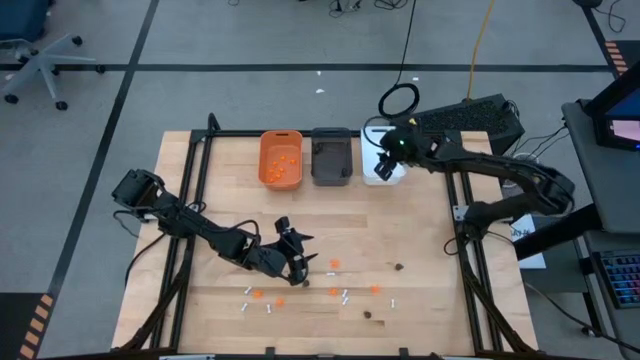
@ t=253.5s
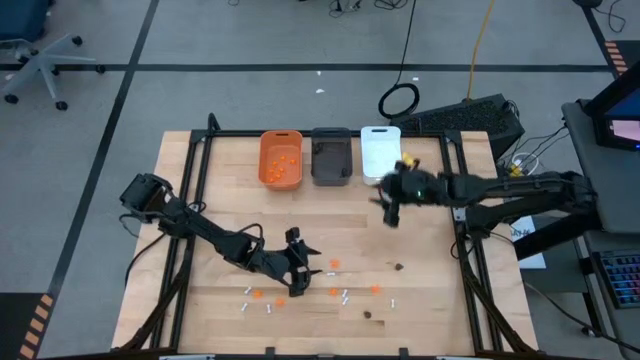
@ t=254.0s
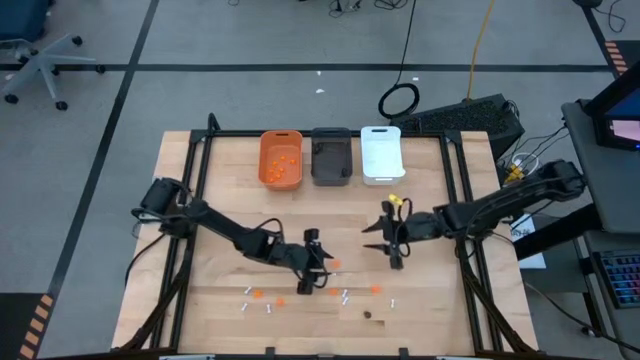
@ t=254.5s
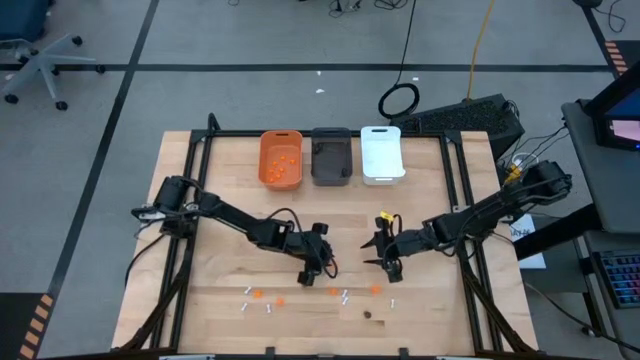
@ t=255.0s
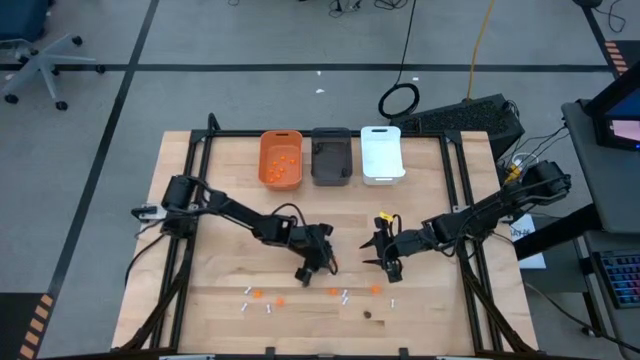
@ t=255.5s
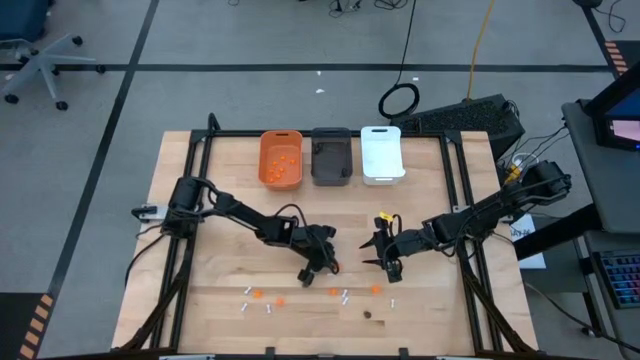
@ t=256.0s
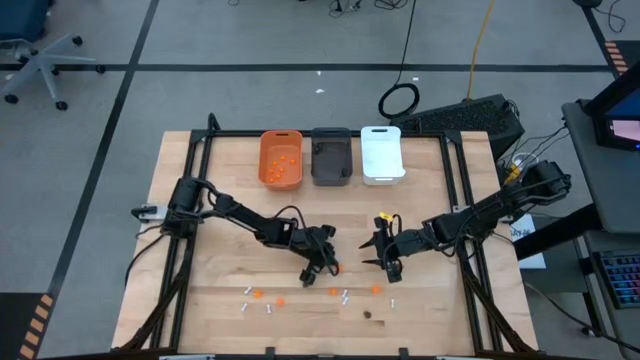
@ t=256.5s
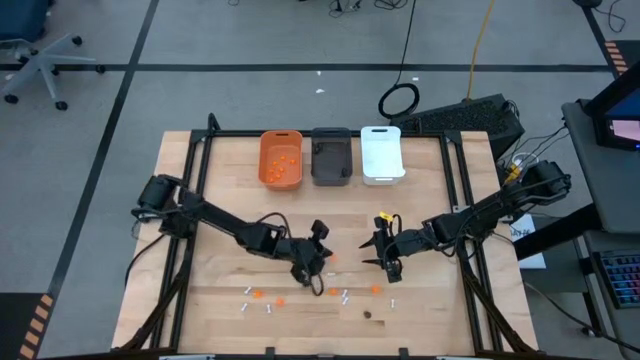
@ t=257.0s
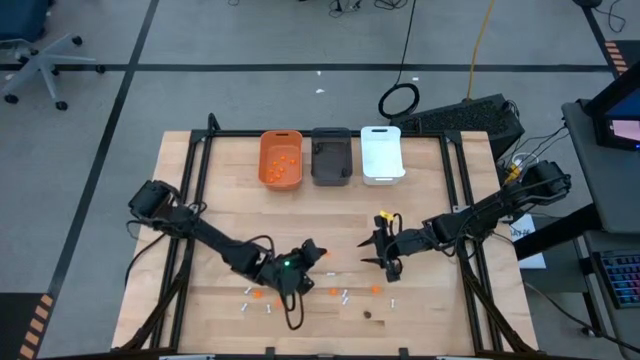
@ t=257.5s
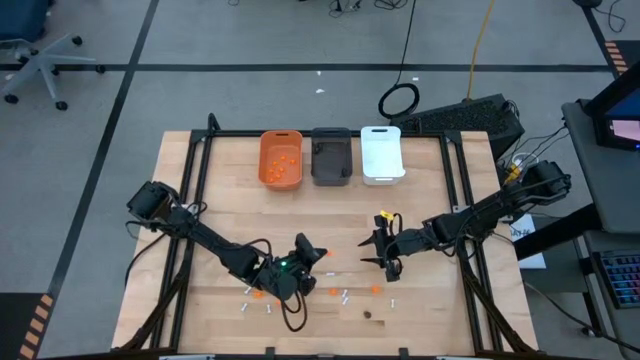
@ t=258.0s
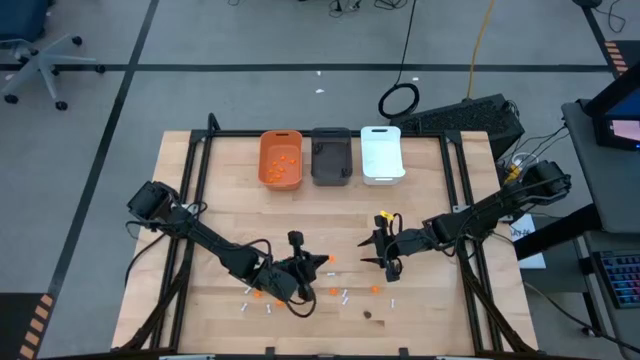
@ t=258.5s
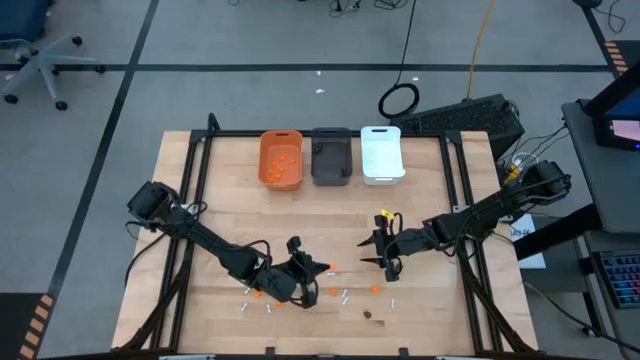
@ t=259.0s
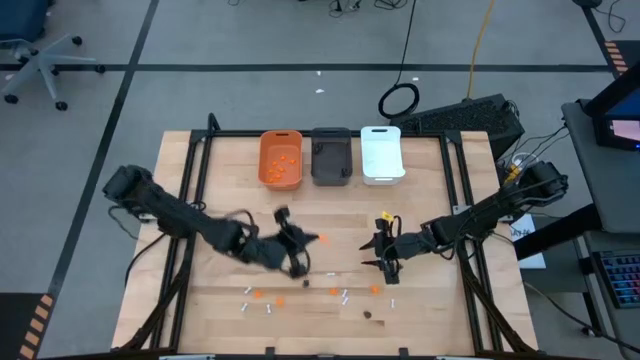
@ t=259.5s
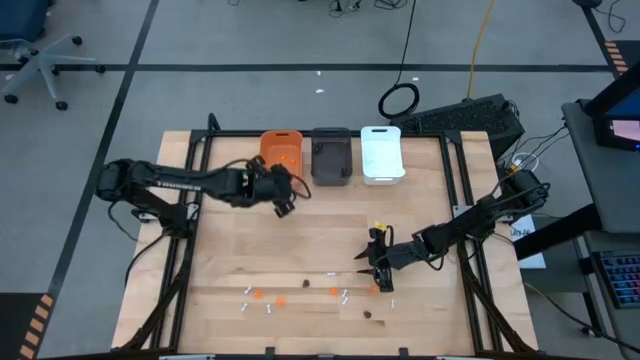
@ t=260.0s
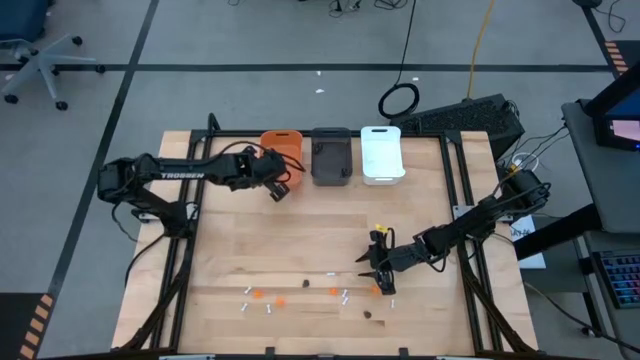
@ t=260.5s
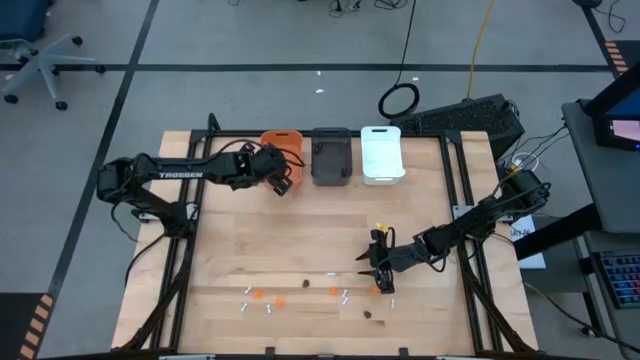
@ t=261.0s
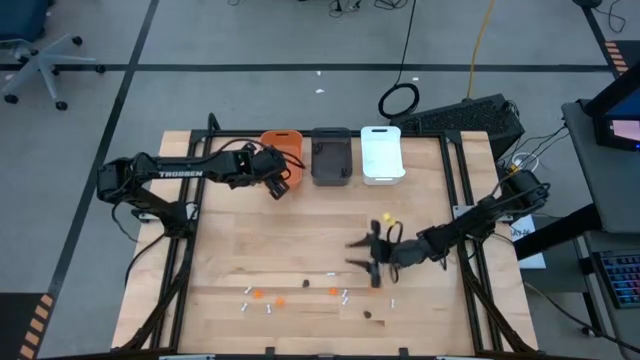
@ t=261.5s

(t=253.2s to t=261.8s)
Task: Sort Halloween decoration
Put the orange spider toy into the orange bin

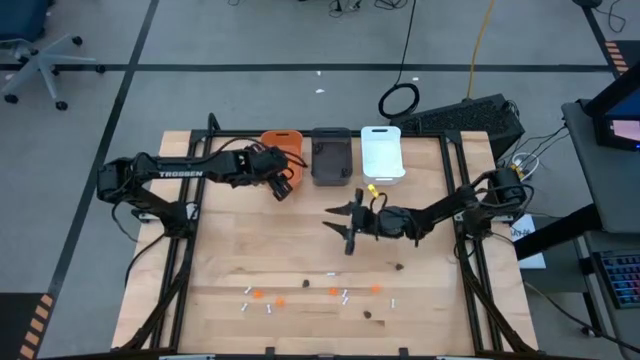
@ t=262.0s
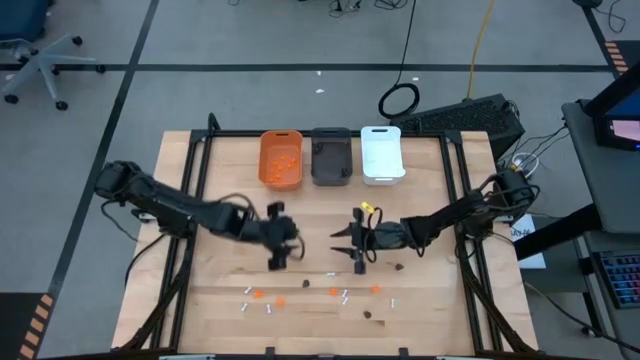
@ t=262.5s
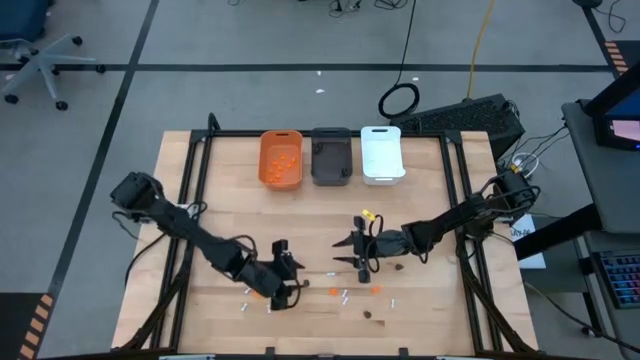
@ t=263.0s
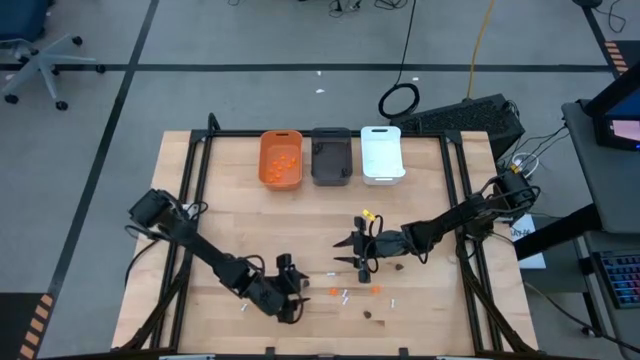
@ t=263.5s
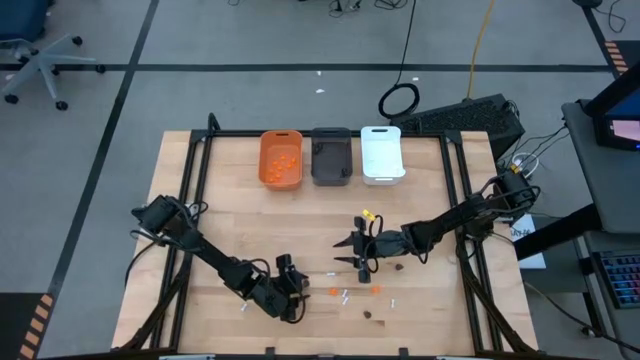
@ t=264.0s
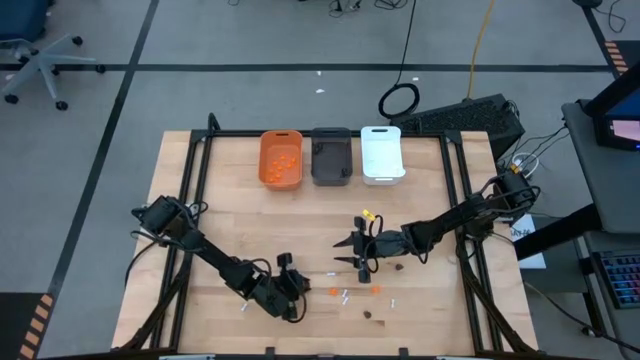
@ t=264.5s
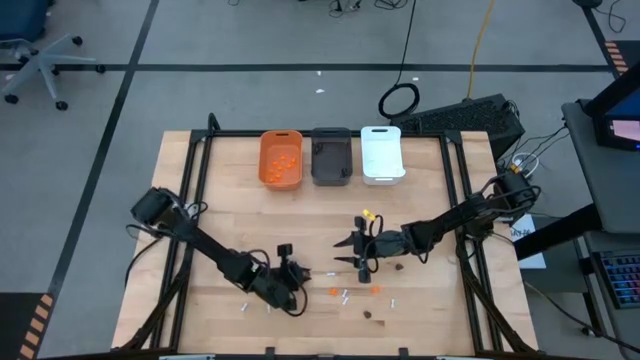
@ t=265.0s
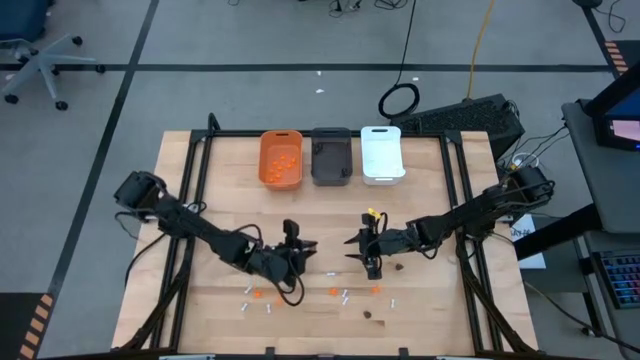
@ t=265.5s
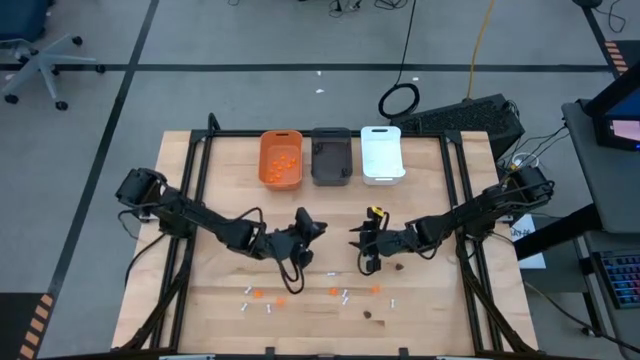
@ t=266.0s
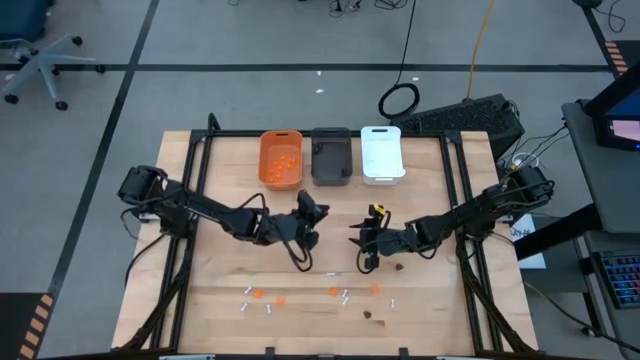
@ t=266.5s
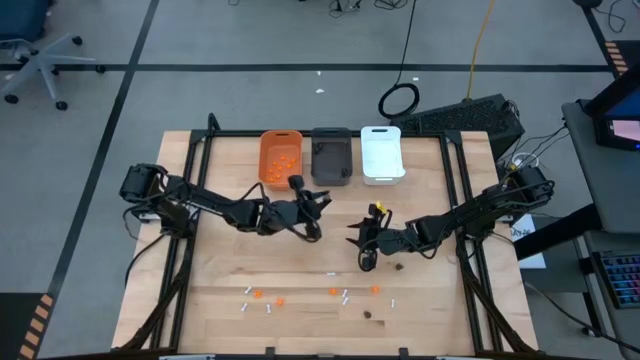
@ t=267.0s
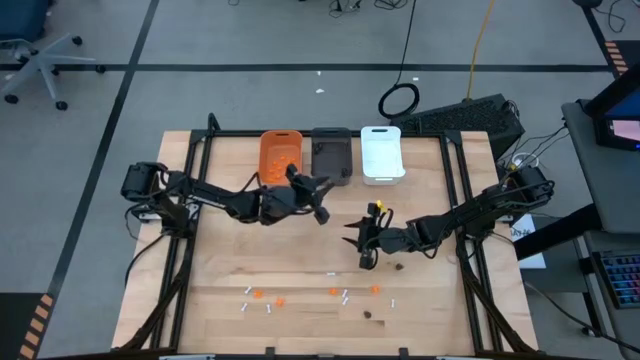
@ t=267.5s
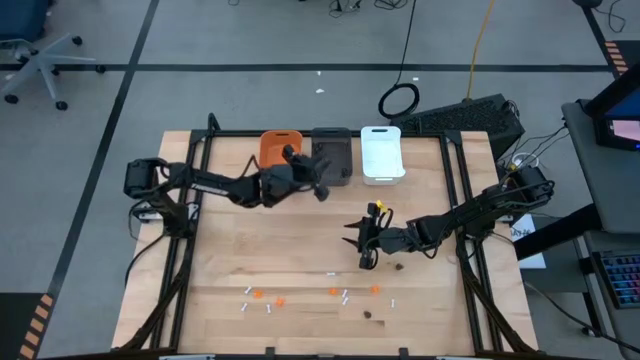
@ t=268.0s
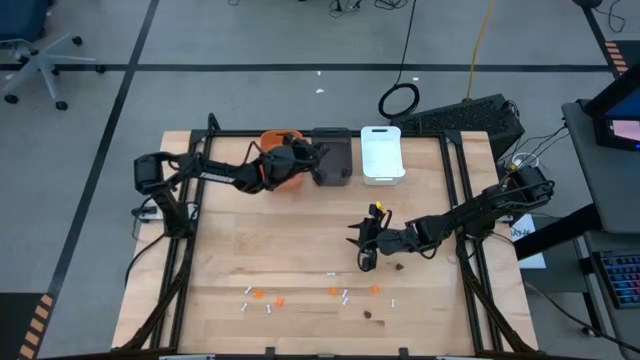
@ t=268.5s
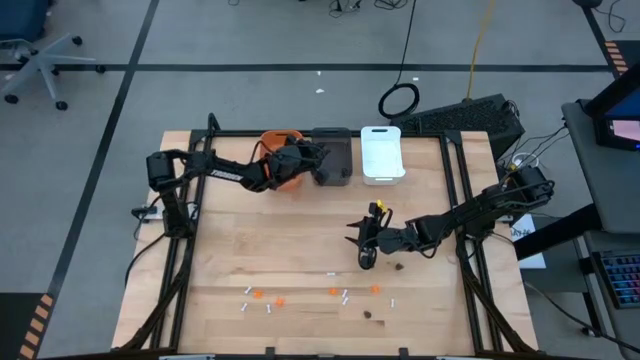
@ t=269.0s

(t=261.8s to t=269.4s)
Put the black skull toy into the black bin
